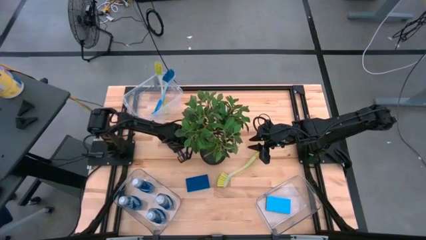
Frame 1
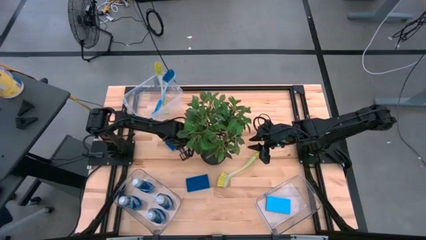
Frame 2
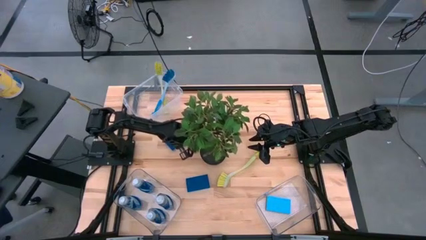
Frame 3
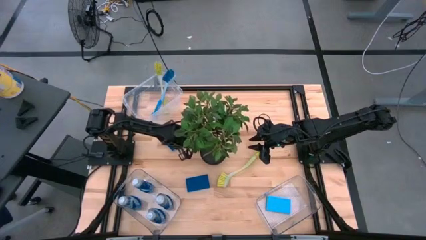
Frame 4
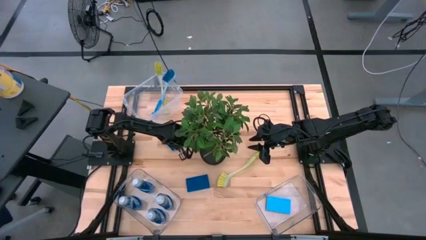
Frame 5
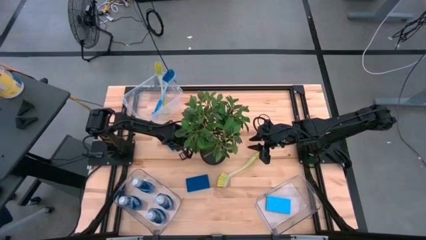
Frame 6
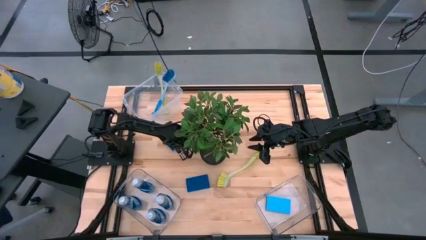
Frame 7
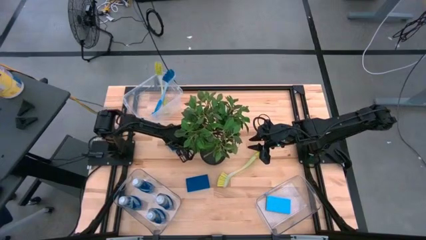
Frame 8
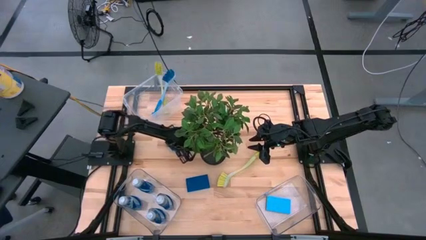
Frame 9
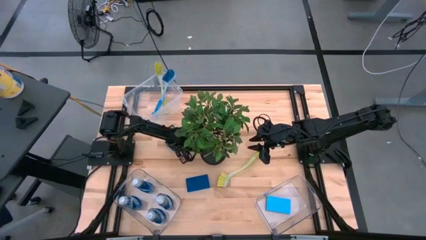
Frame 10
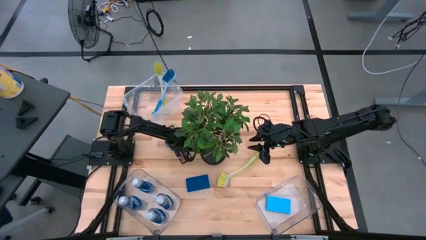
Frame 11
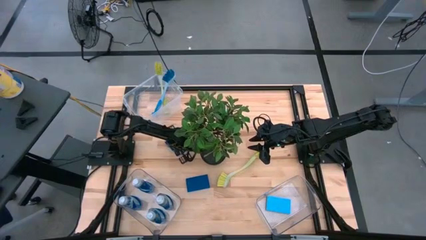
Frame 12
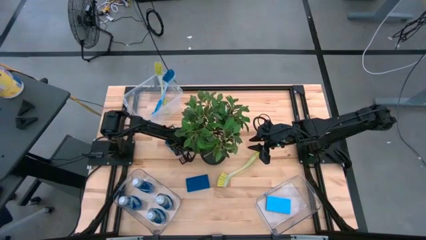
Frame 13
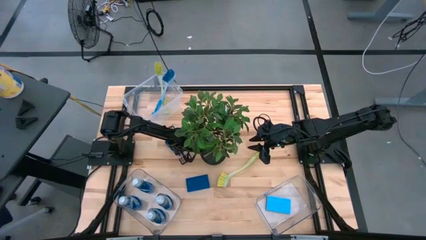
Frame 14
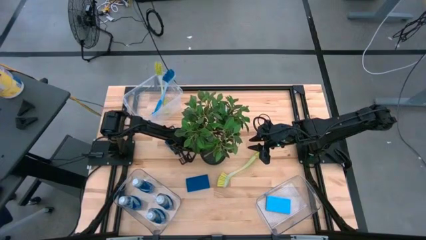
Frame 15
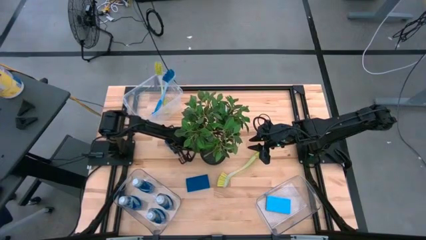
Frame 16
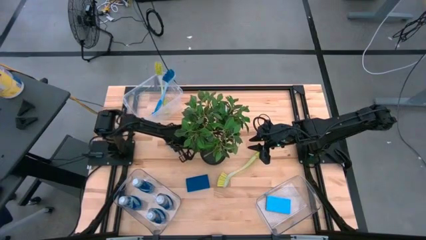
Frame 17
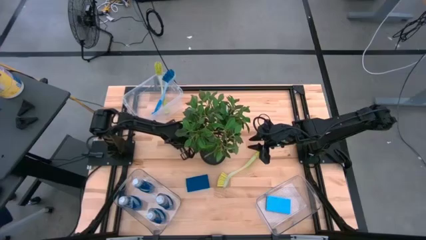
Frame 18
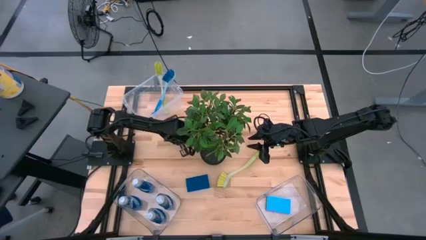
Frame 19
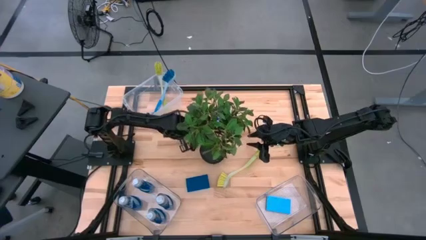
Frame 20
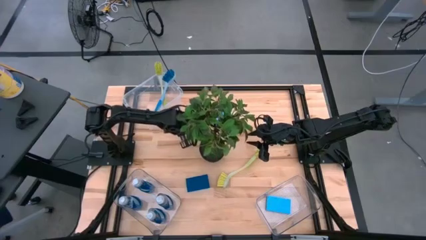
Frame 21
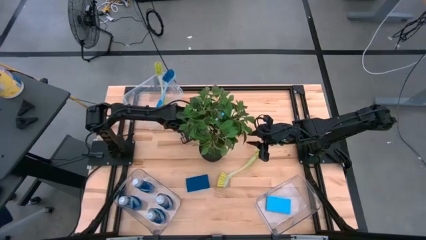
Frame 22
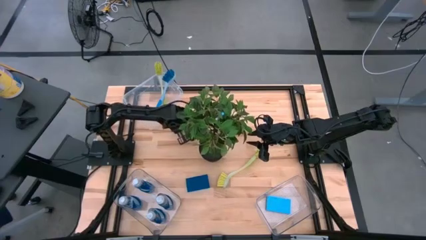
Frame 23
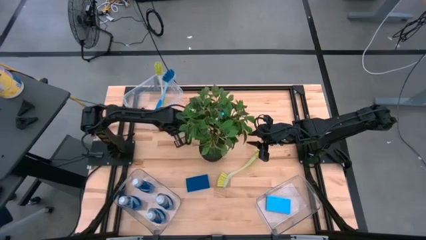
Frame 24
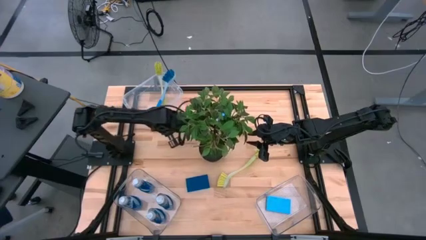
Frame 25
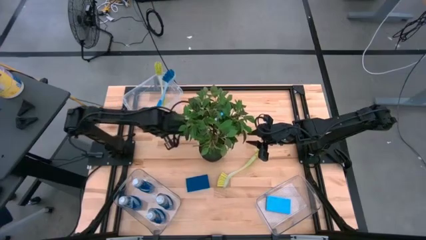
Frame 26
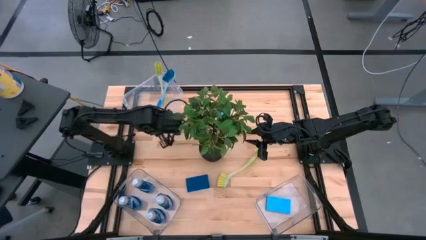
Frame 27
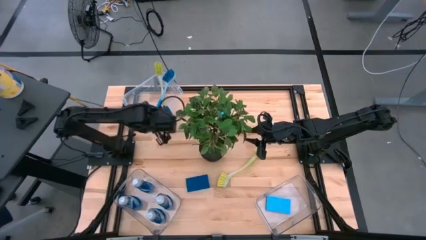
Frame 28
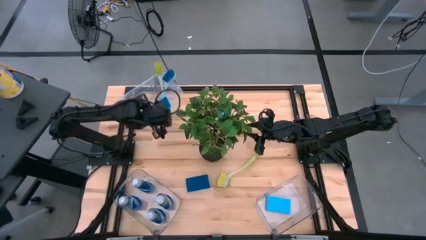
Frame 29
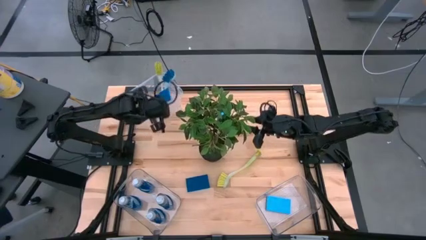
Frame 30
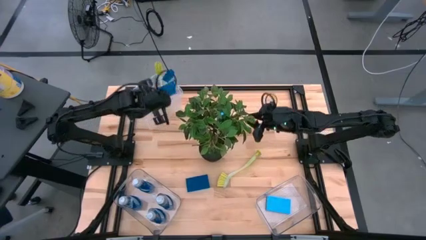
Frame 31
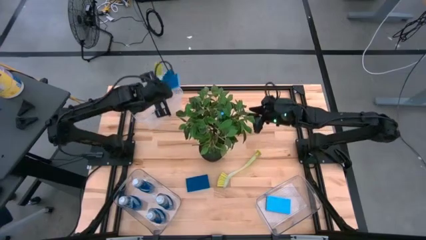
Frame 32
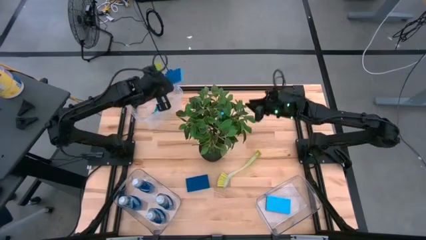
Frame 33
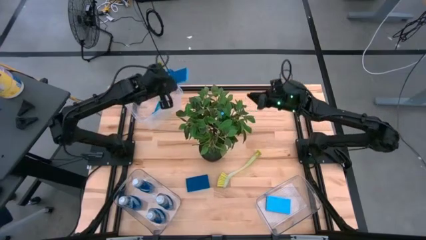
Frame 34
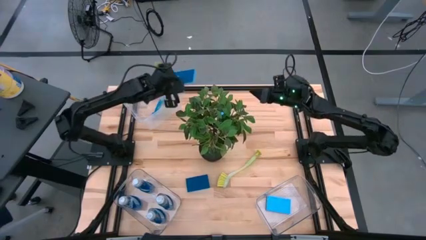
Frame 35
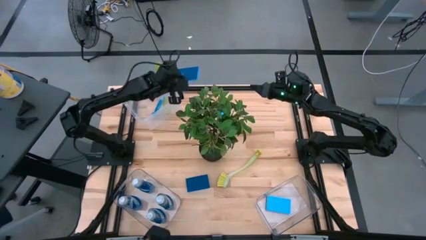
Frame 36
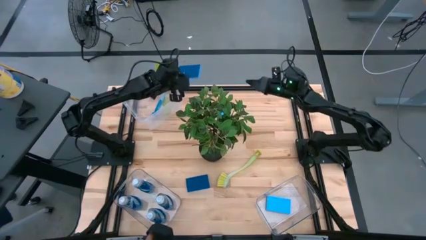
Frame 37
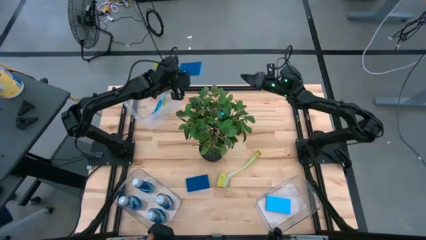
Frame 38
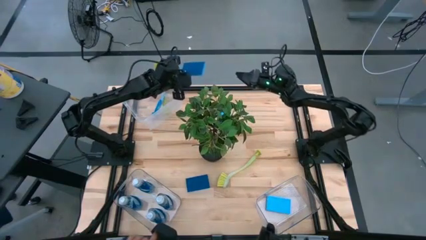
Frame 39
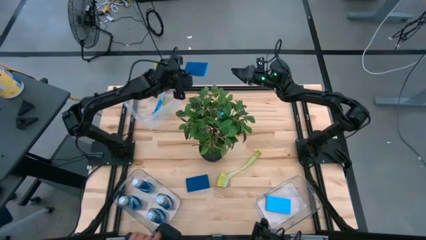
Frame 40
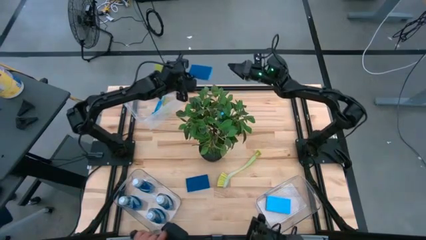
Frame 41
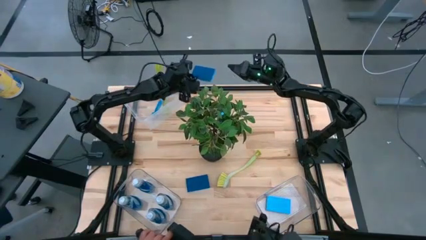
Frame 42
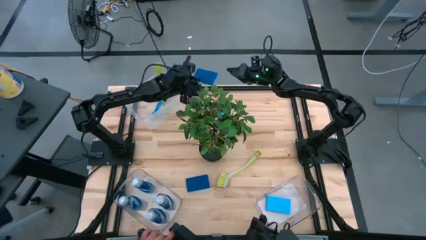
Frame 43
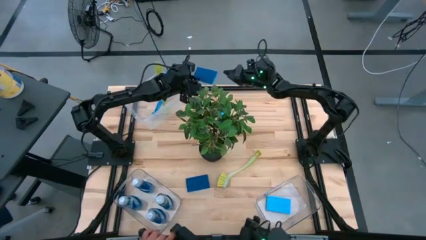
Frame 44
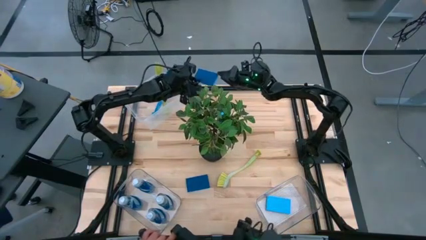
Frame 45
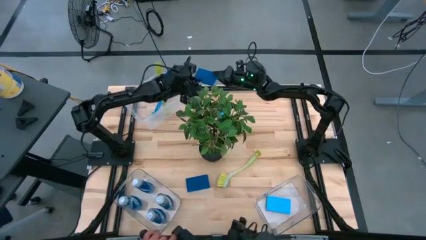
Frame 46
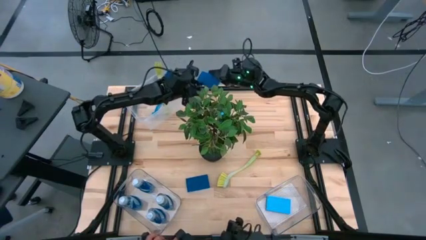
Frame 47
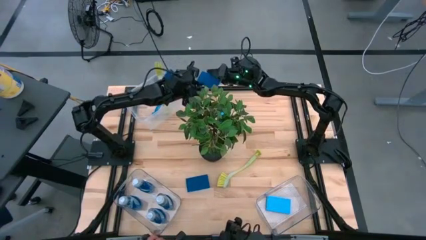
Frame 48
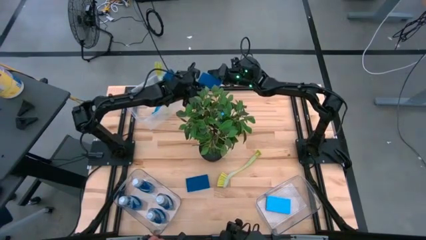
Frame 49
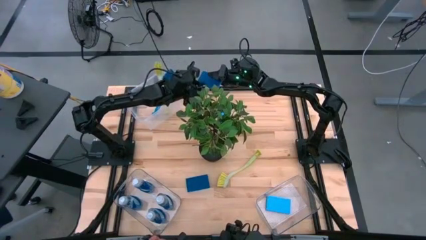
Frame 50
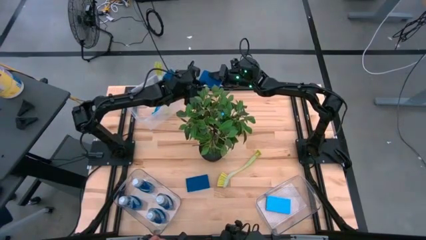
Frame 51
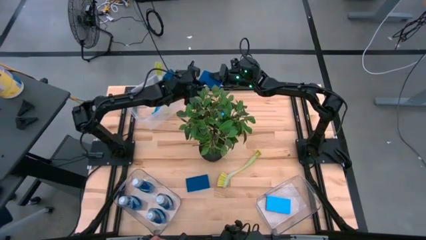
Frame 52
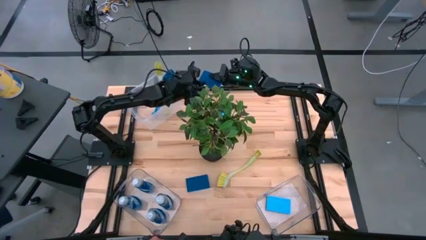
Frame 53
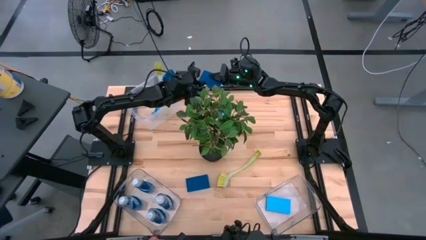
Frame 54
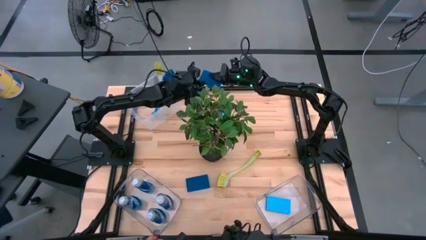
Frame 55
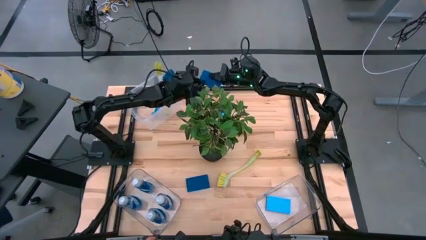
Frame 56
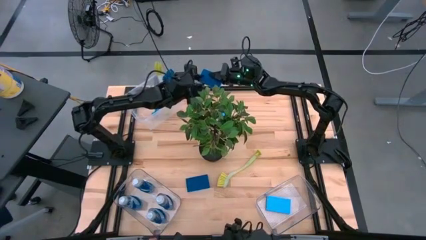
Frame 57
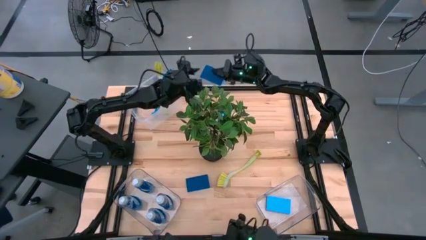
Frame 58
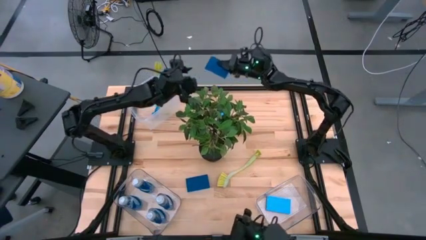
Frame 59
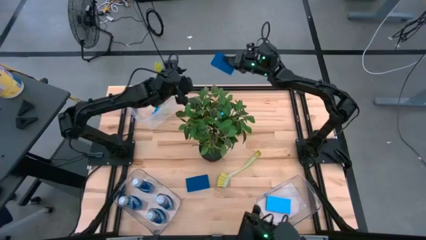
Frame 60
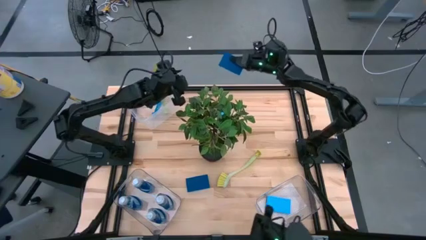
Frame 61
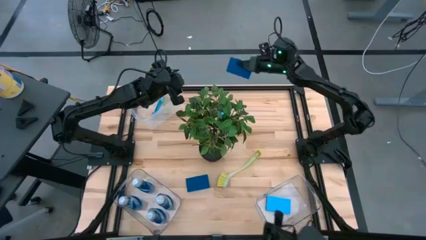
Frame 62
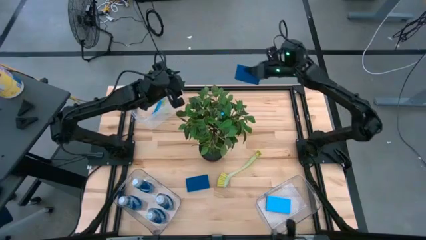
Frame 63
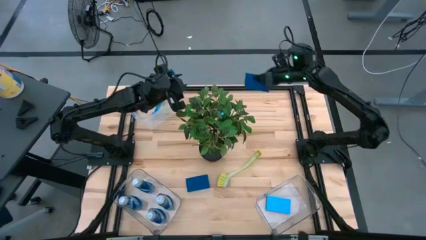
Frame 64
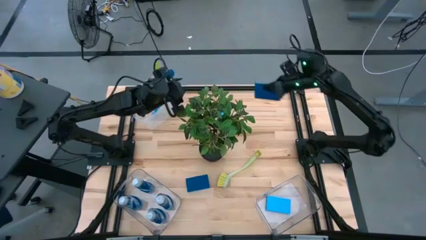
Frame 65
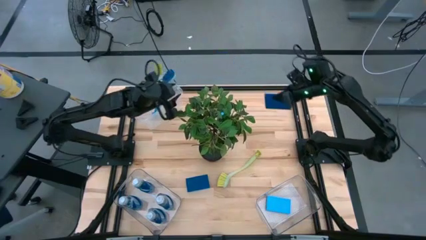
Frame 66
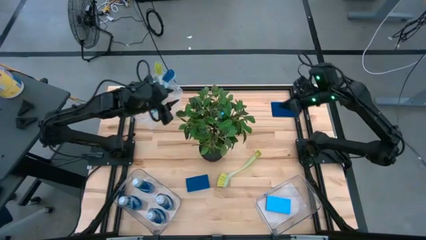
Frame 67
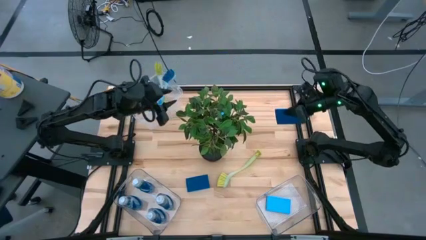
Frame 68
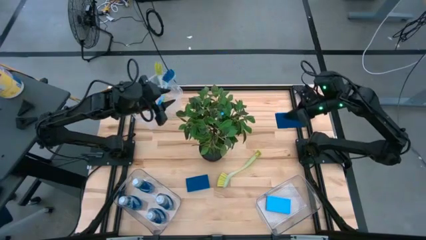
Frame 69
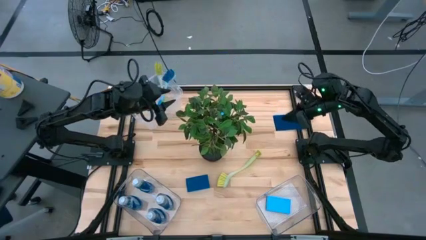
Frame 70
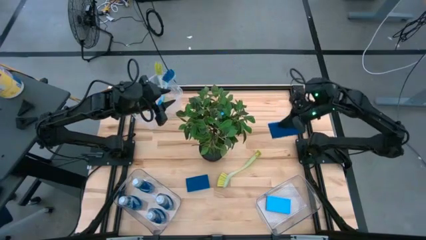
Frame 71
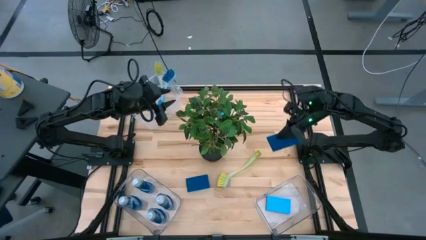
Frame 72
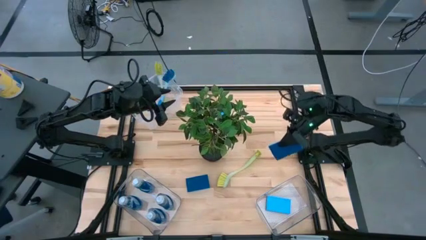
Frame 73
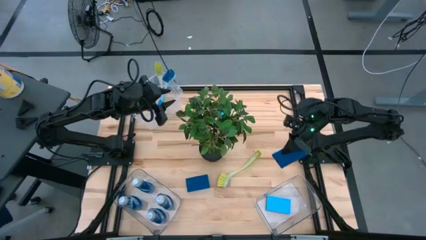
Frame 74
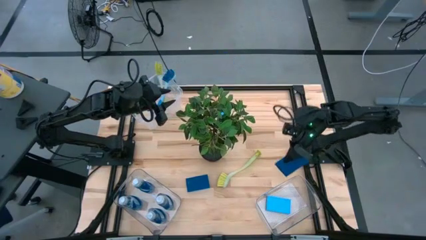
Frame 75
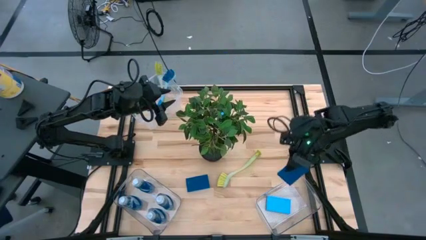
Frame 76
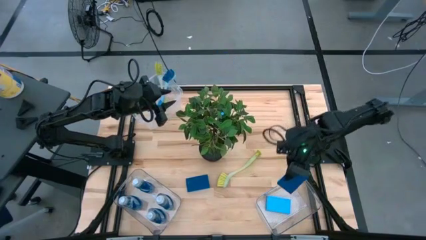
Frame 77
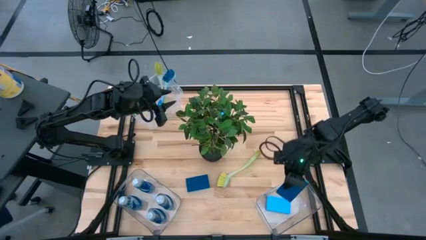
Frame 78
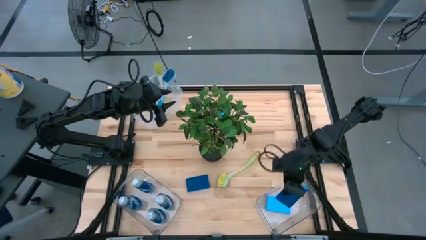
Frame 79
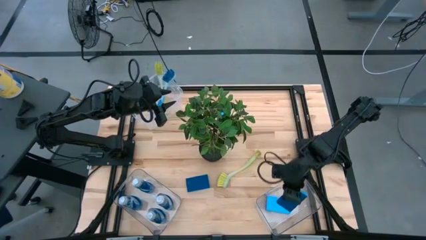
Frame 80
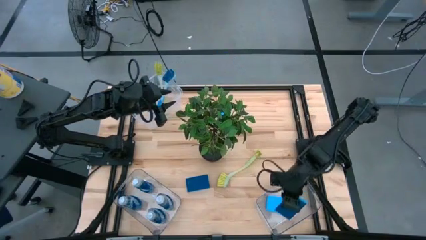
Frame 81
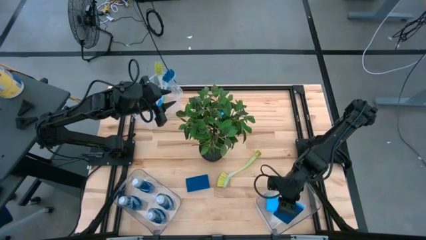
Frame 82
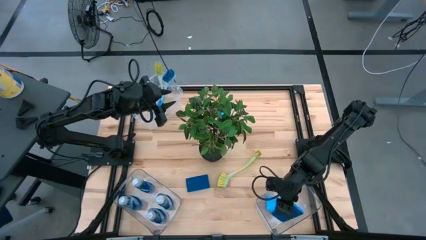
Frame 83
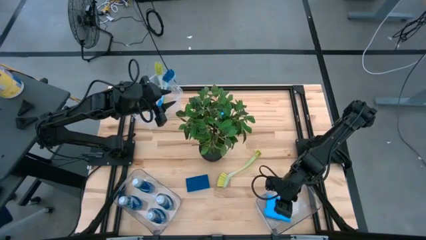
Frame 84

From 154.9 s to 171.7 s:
Task: Pick & Place Kitchen Sink Supplies
Put the blue sponge into the bottom right transparent bin
